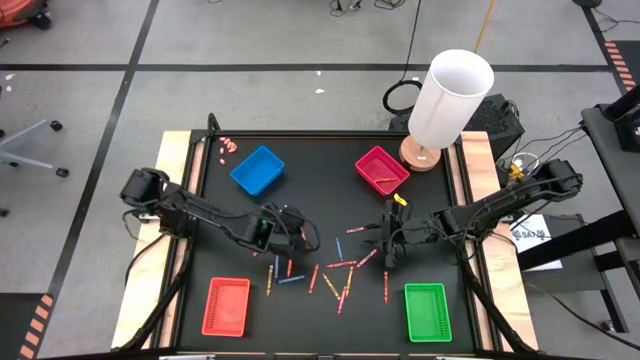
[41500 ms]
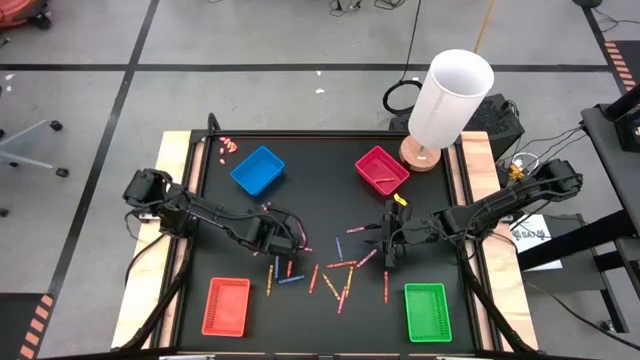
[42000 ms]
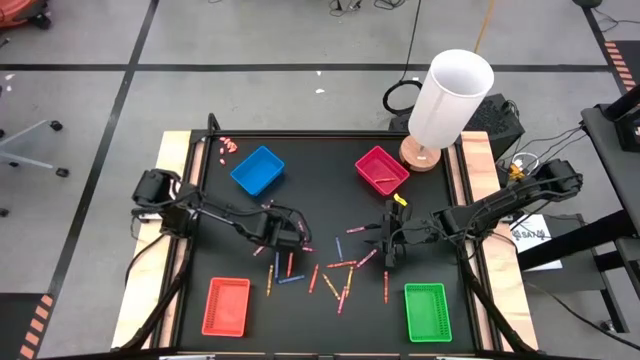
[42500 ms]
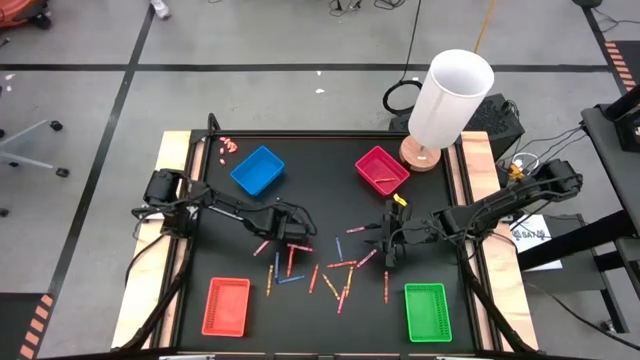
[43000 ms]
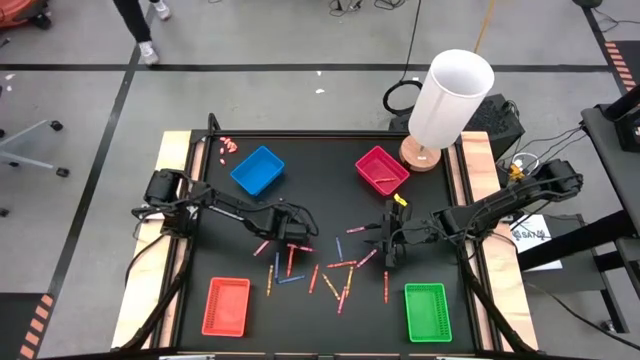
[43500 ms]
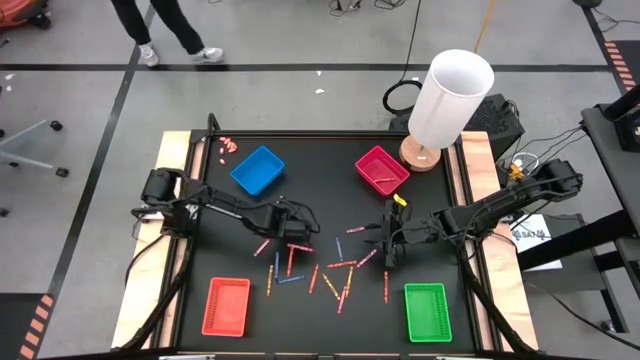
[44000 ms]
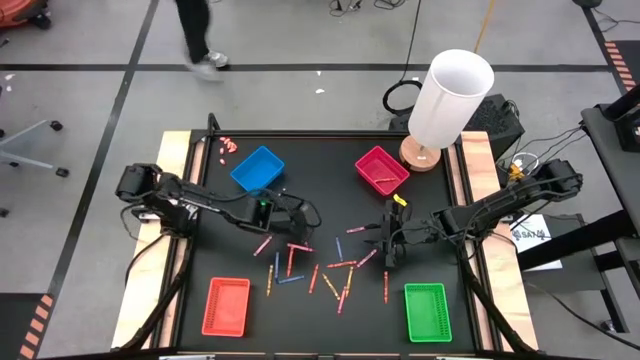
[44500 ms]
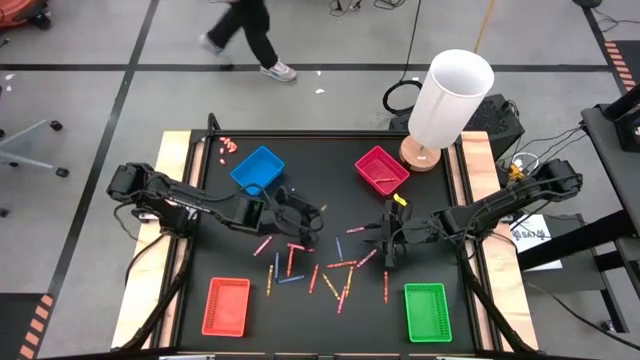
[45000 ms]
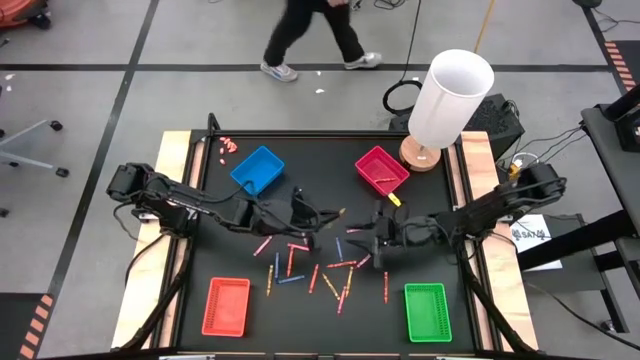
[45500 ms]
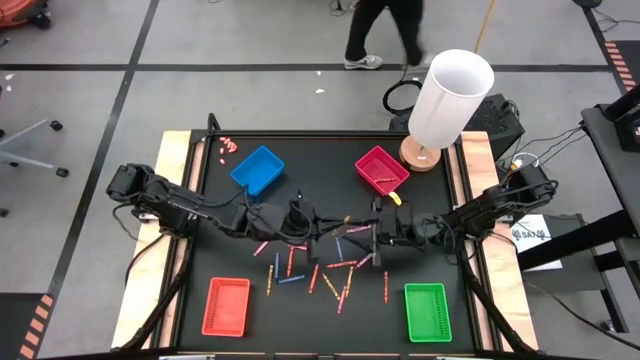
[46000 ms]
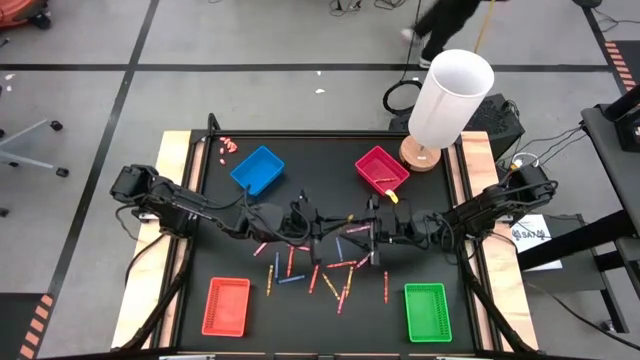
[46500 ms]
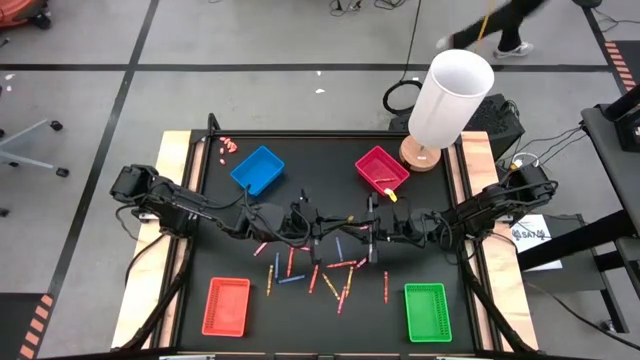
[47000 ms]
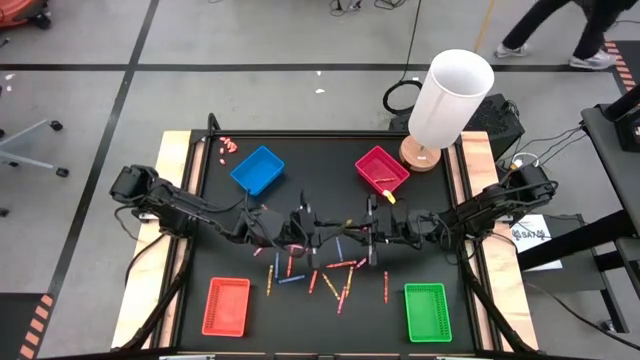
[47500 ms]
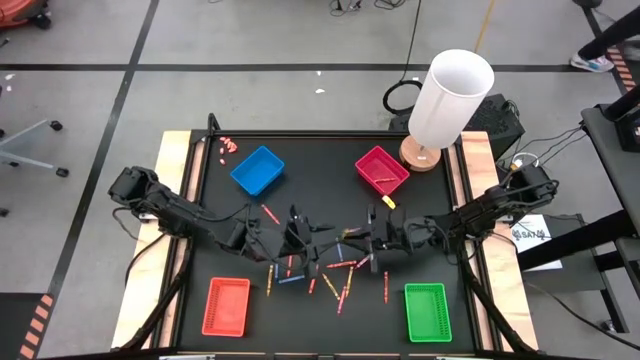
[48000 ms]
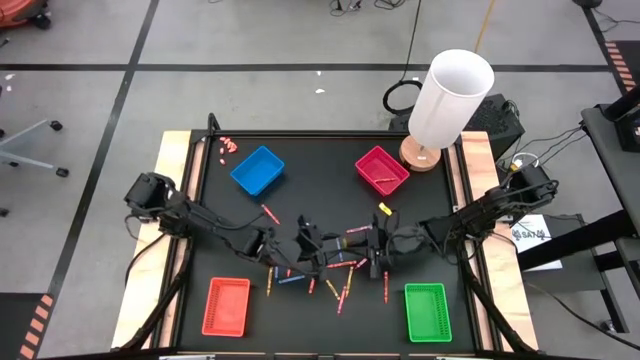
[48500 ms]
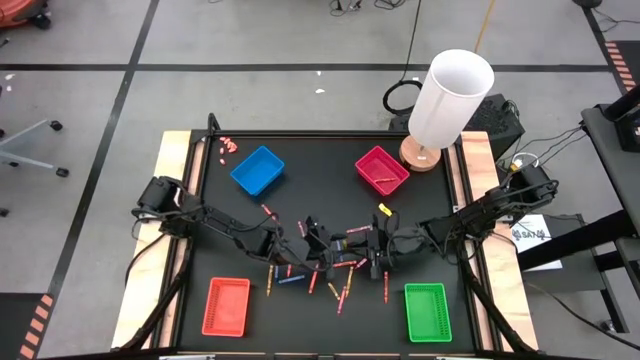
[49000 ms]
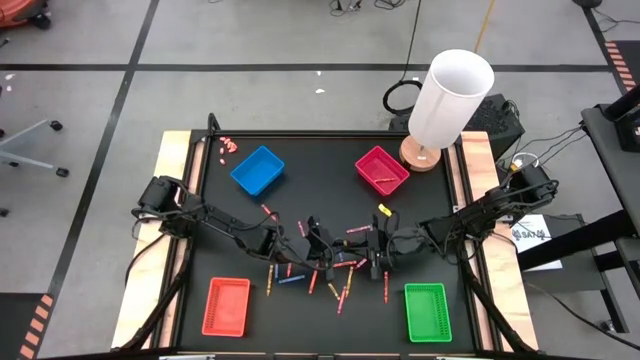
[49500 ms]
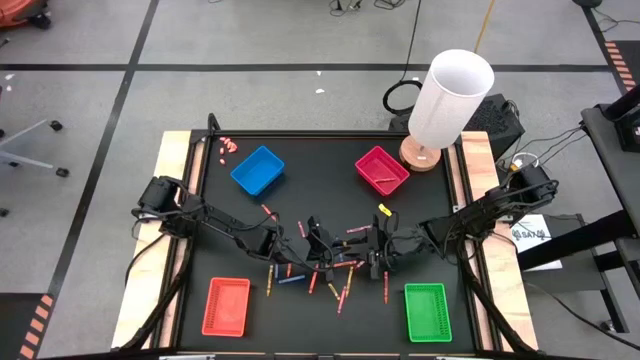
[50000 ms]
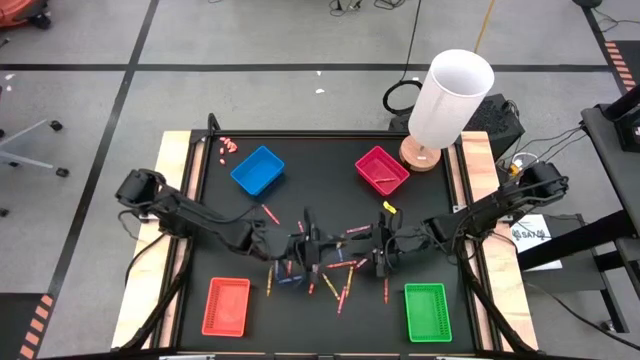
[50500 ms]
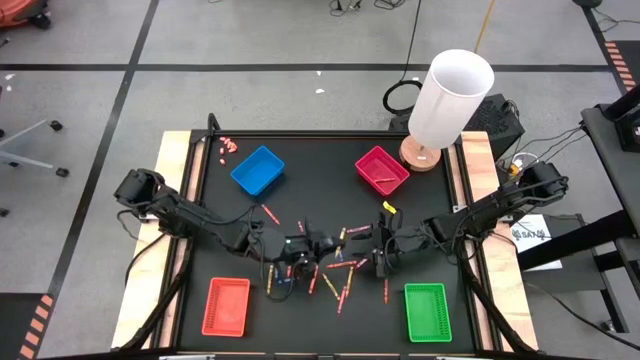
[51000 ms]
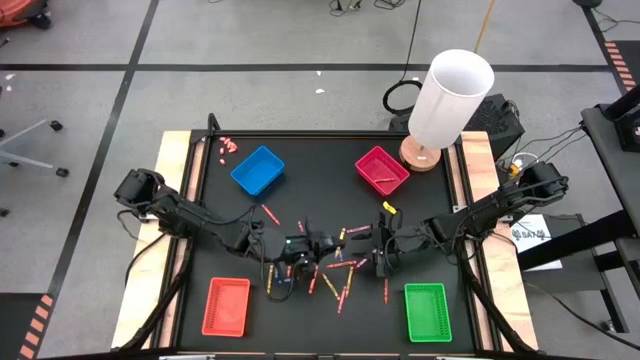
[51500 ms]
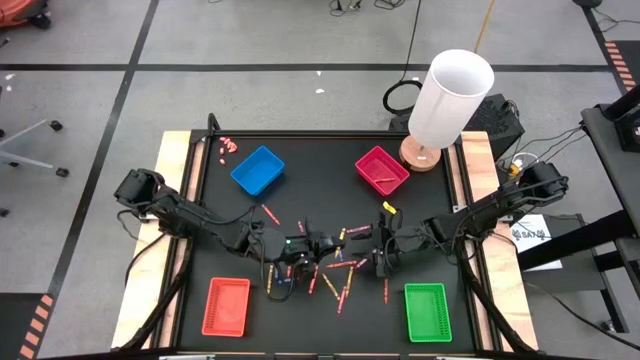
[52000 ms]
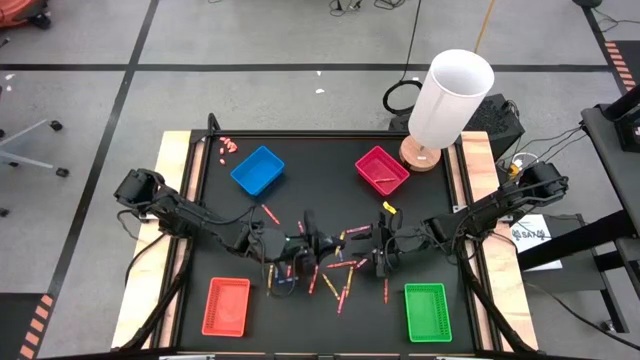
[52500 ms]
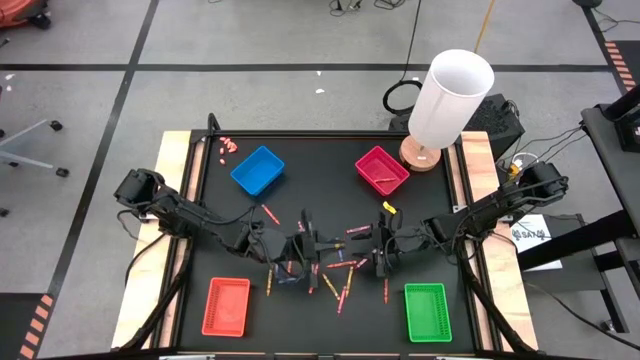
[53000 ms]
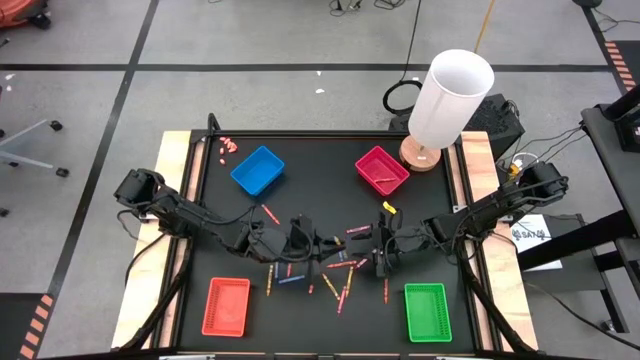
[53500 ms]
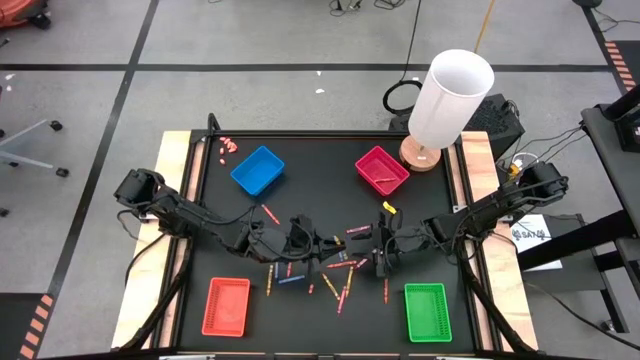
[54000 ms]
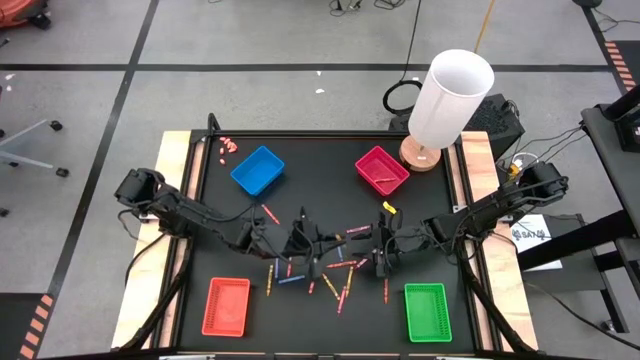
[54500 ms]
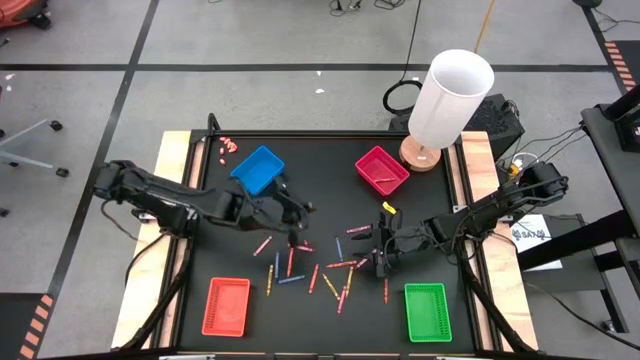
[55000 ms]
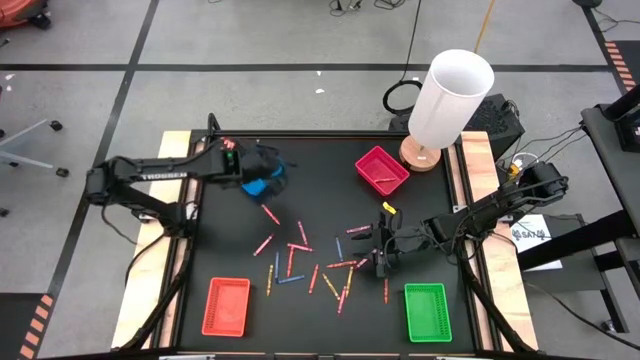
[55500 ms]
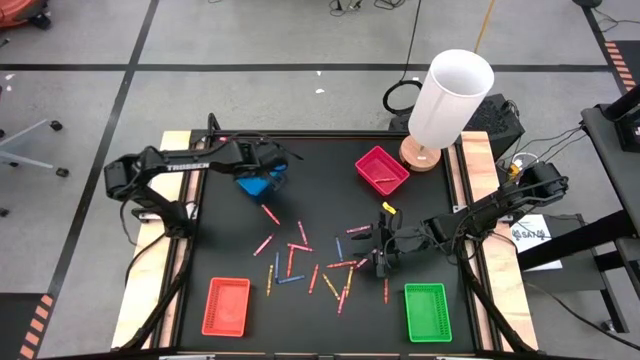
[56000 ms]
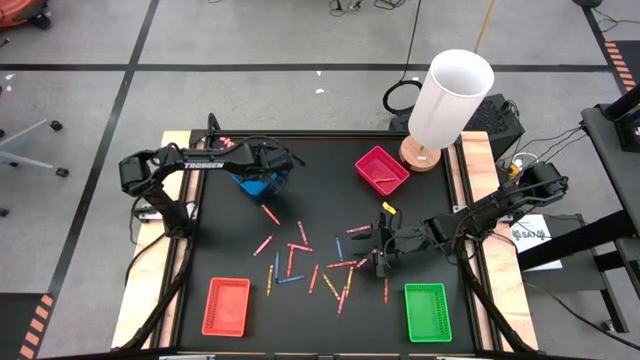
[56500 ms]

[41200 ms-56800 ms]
Task: Sort crayons
Put the yellow crayon into the blue bin

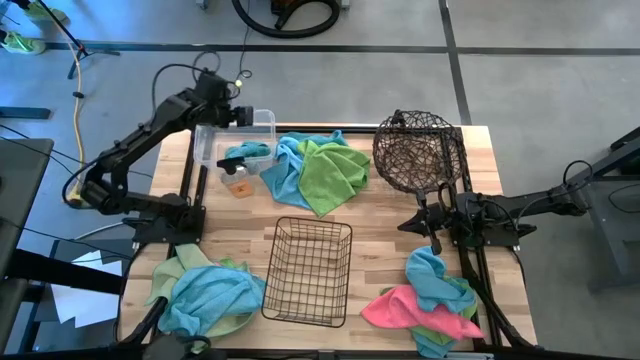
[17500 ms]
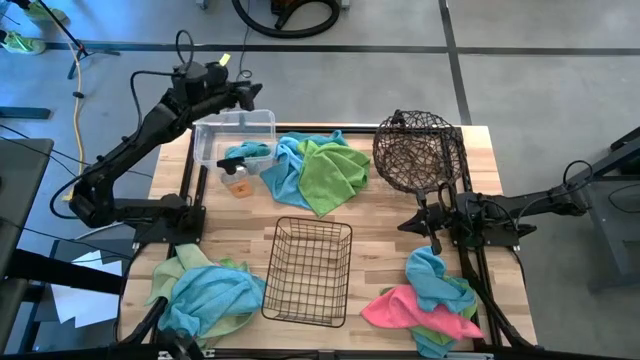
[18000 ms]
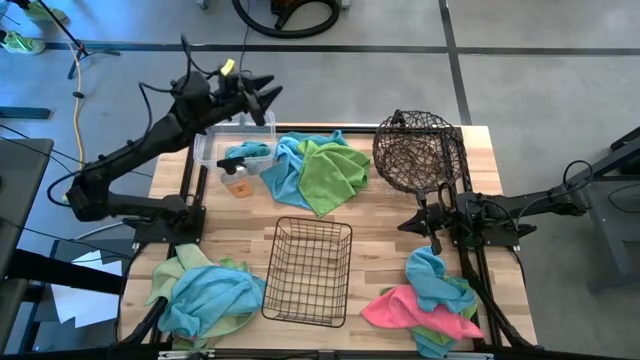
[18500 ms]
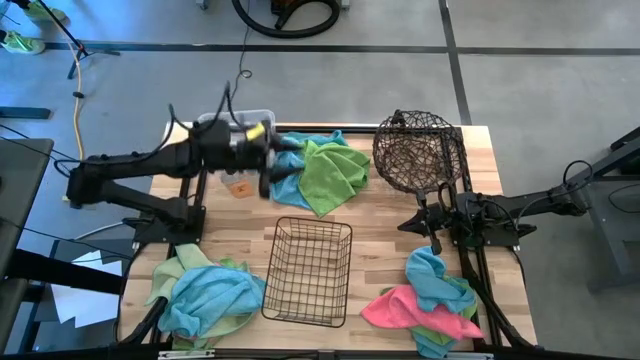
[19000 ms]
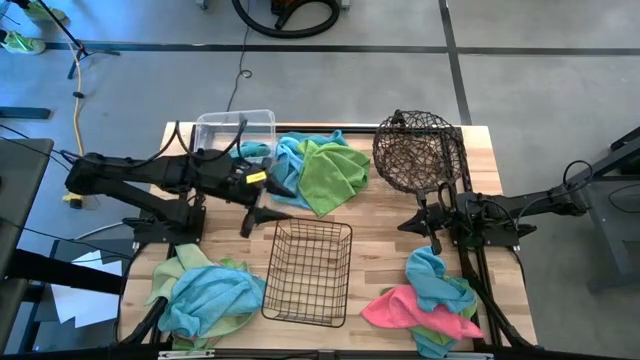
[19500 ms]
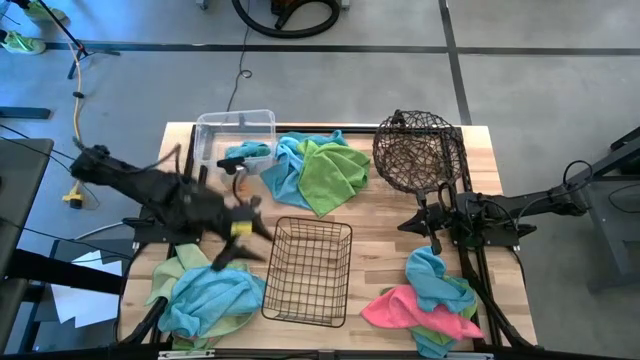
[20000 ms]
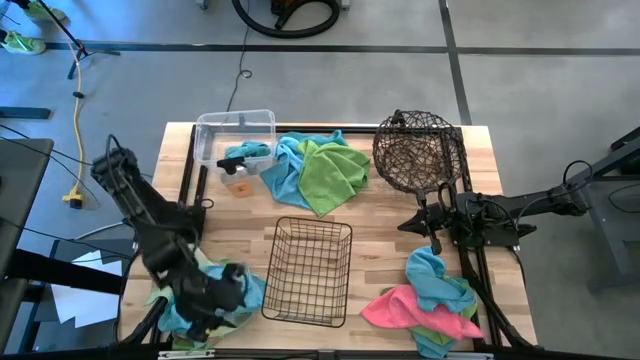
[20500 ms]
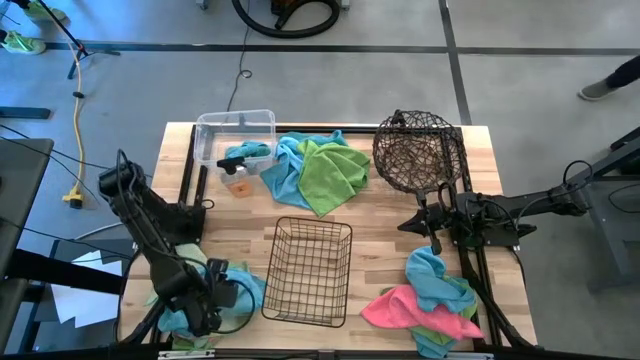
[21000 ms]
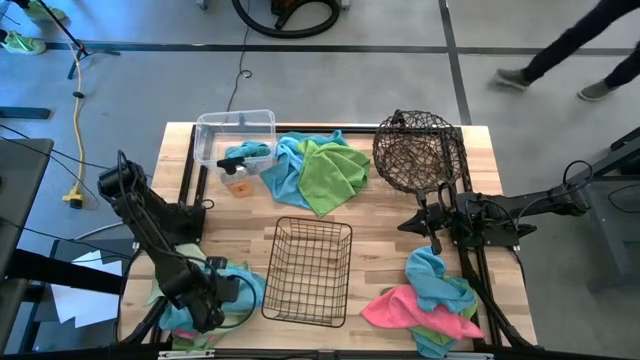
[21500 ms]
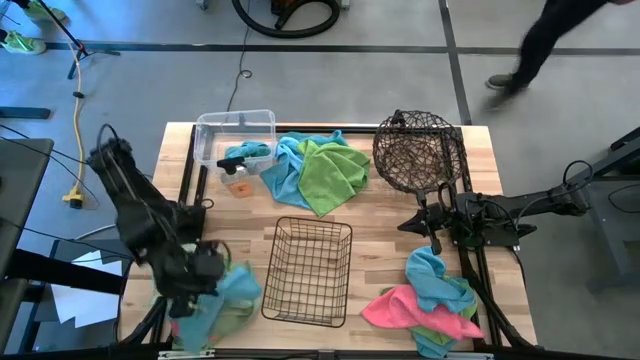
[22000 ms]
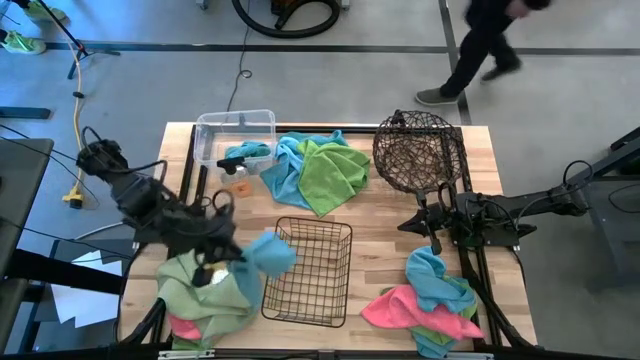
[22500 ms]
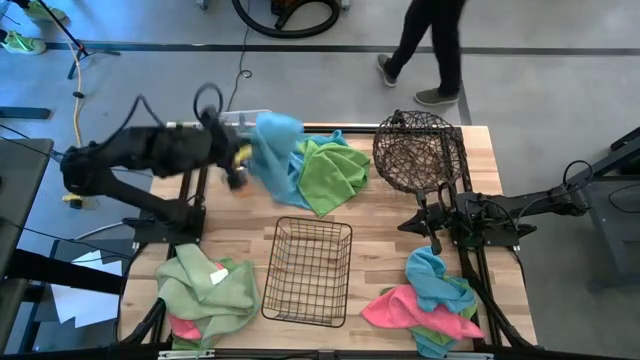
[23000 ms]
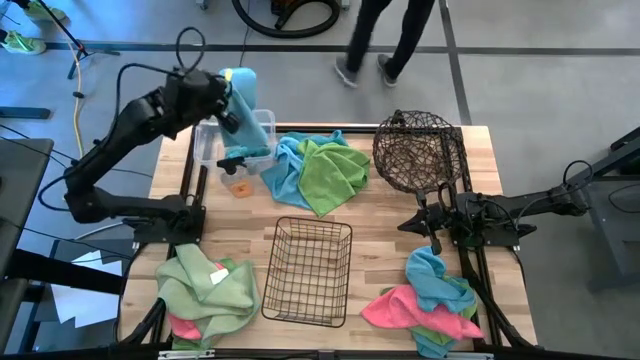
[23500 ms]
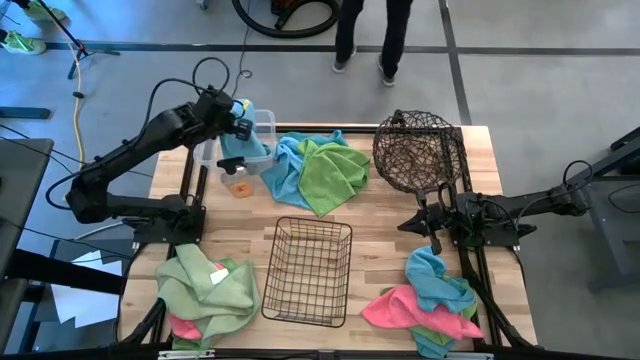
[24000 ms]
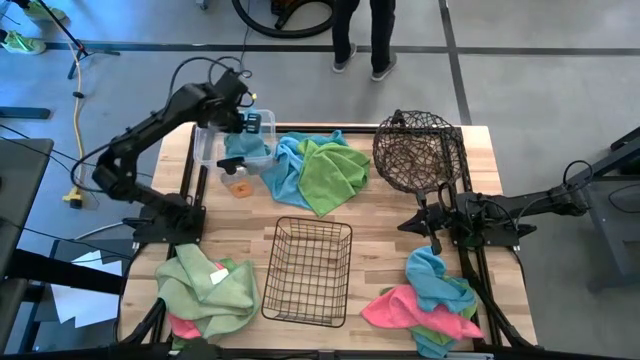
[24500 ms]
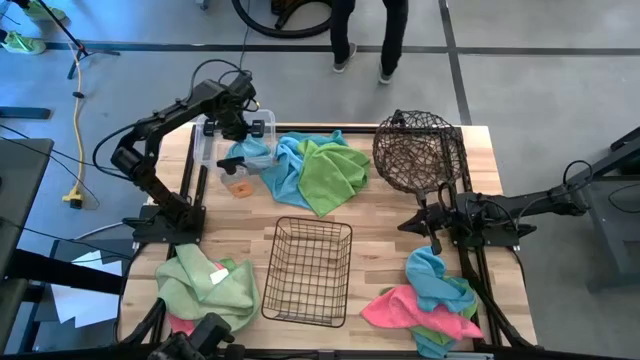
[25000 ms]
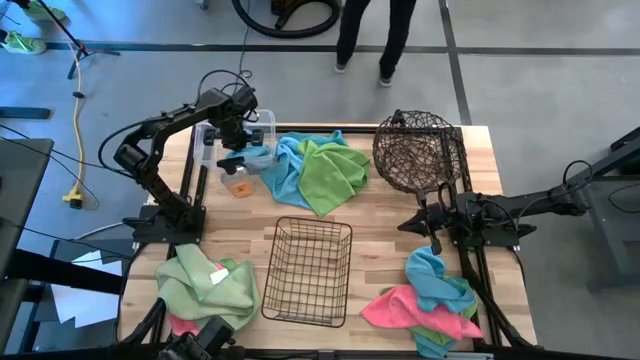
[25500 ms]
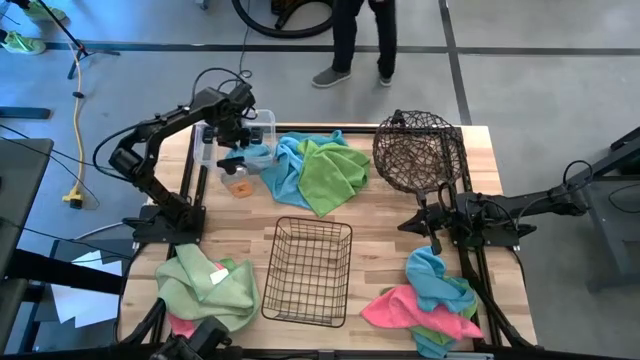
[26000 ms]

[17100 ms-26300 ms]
Task: Sort microfiber towel by color & place in baskets
Put the blue microfiber towel into the transparent bin
